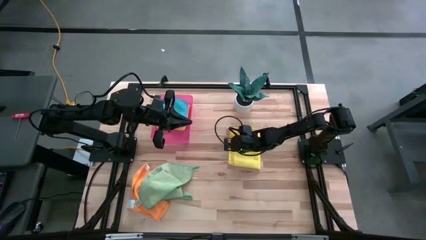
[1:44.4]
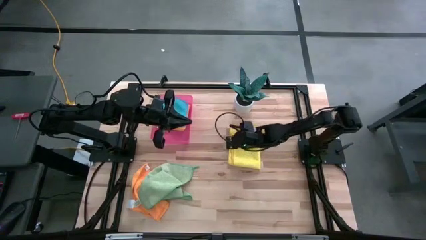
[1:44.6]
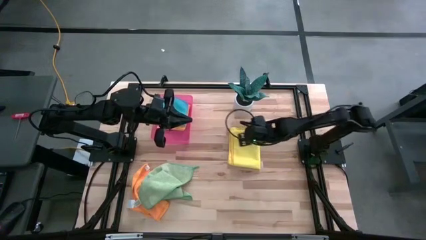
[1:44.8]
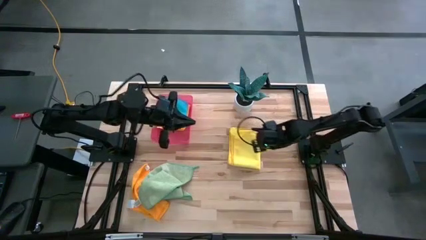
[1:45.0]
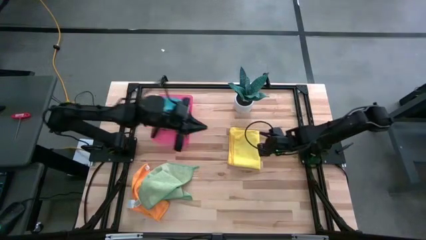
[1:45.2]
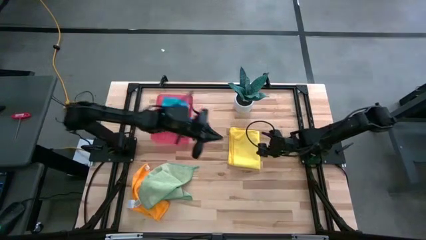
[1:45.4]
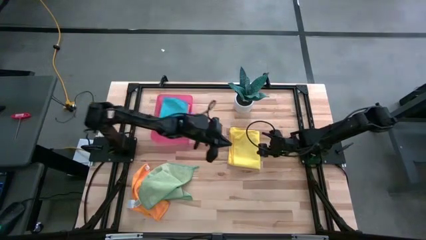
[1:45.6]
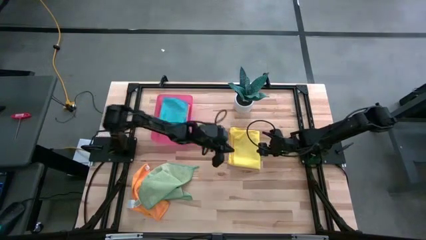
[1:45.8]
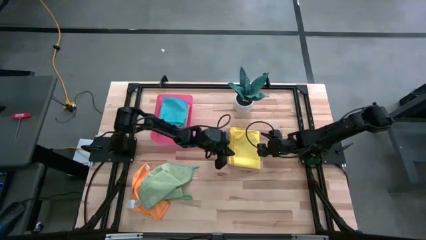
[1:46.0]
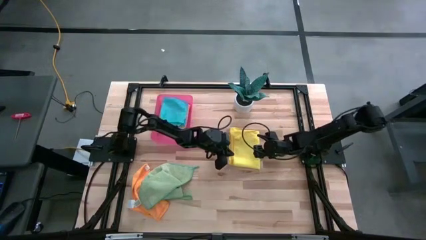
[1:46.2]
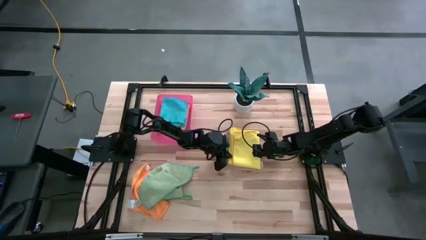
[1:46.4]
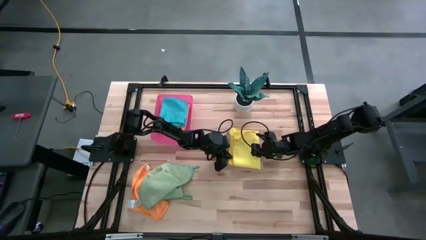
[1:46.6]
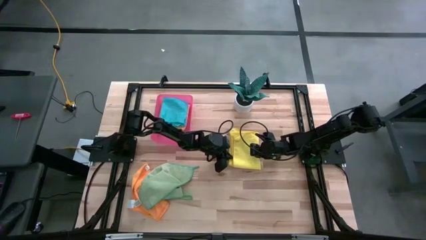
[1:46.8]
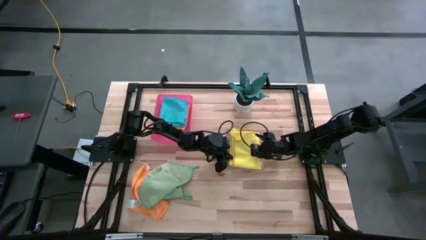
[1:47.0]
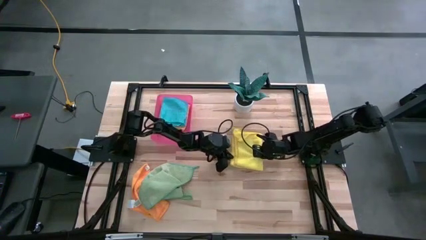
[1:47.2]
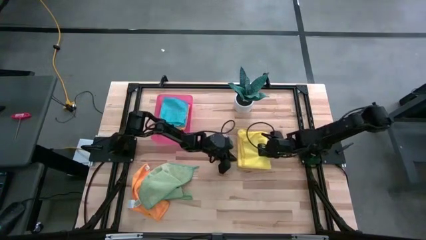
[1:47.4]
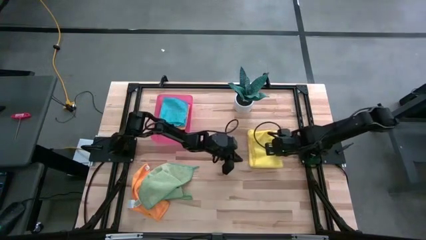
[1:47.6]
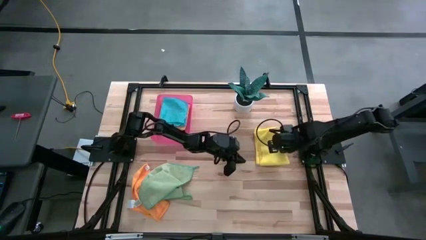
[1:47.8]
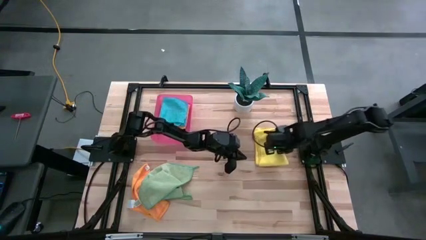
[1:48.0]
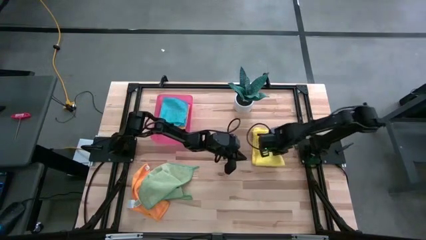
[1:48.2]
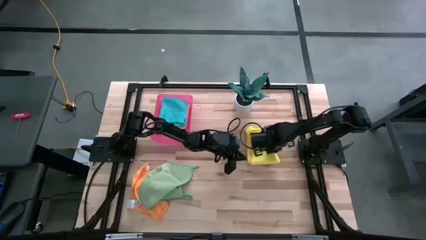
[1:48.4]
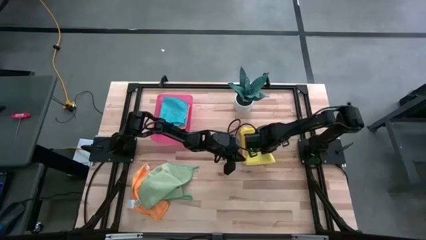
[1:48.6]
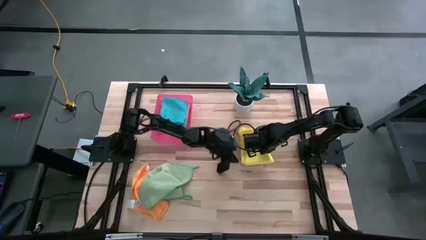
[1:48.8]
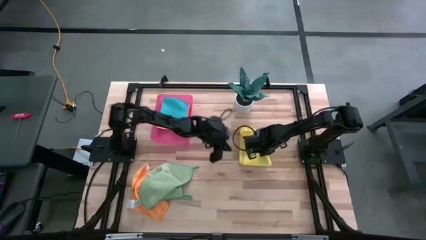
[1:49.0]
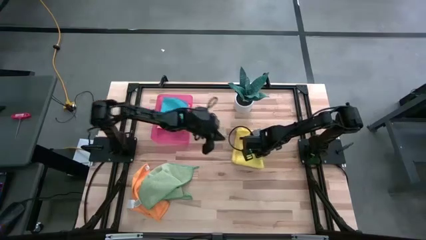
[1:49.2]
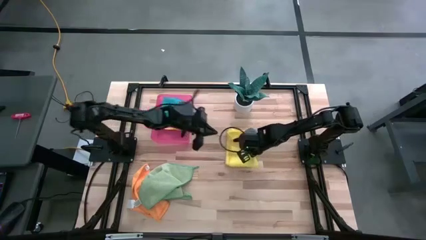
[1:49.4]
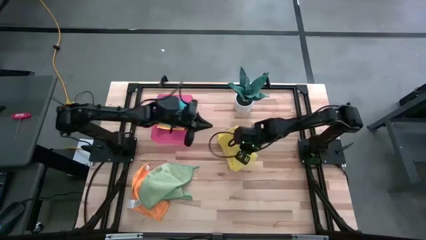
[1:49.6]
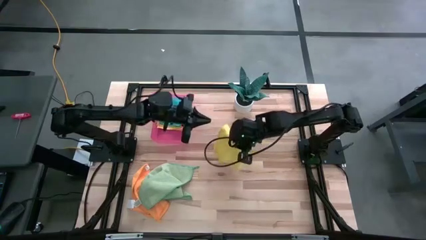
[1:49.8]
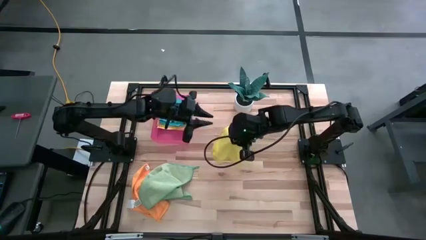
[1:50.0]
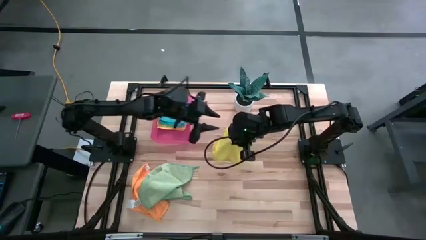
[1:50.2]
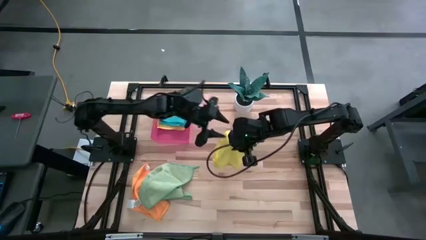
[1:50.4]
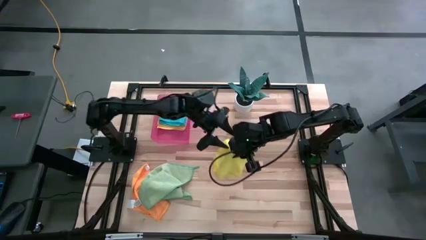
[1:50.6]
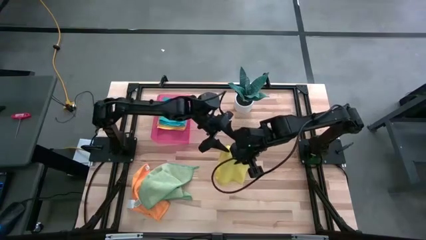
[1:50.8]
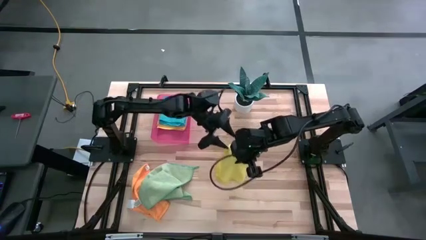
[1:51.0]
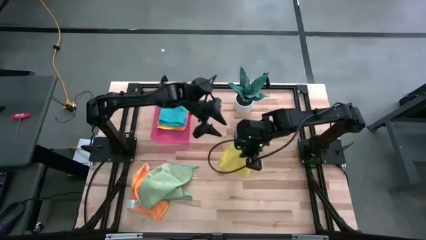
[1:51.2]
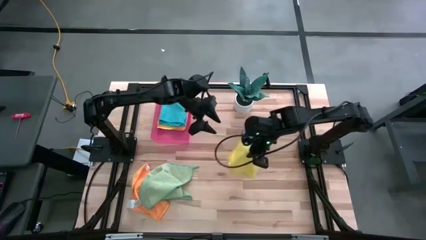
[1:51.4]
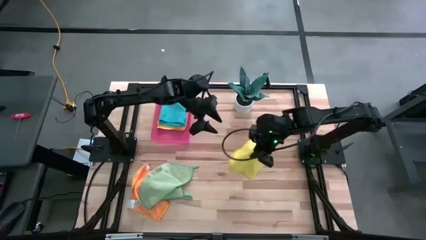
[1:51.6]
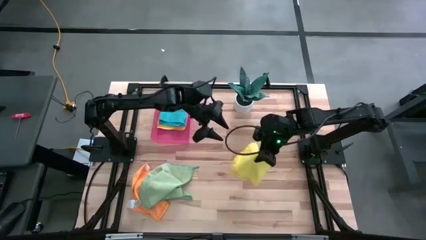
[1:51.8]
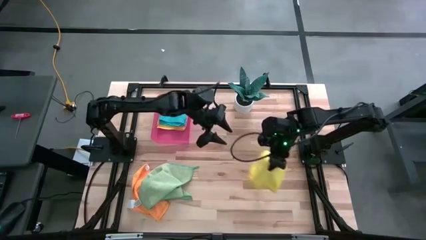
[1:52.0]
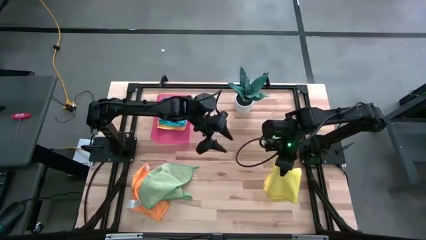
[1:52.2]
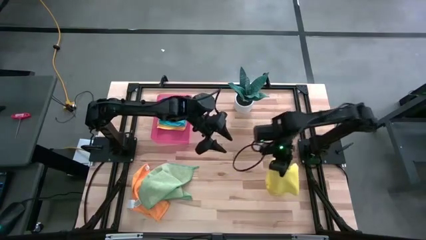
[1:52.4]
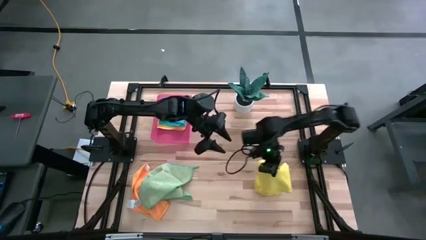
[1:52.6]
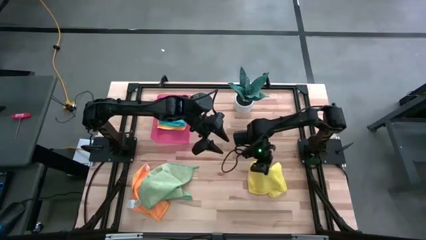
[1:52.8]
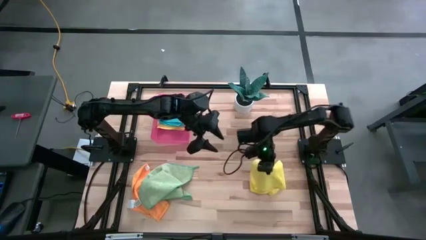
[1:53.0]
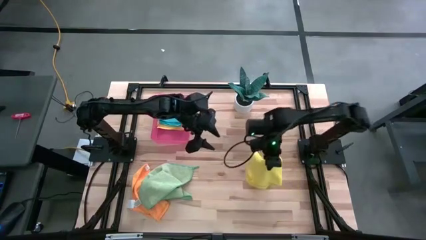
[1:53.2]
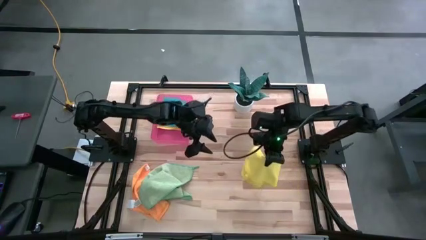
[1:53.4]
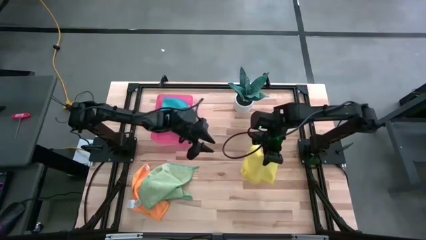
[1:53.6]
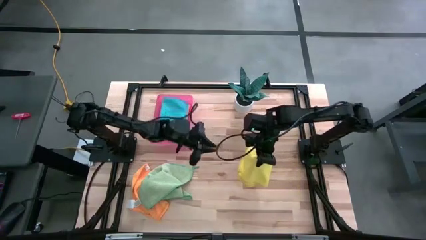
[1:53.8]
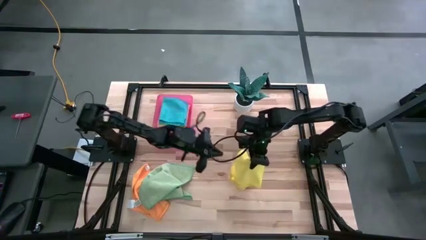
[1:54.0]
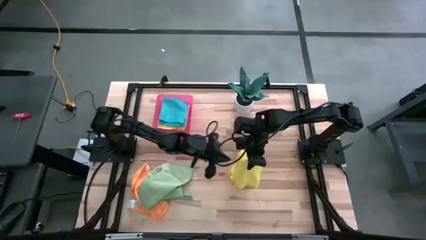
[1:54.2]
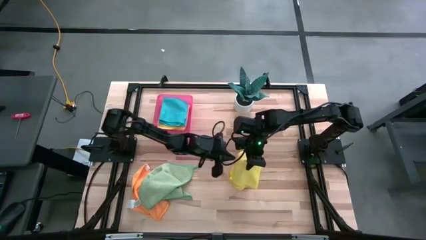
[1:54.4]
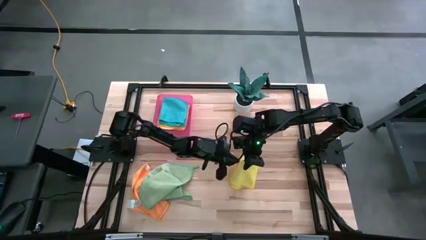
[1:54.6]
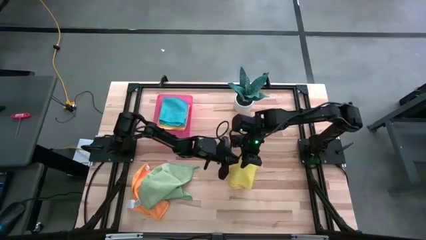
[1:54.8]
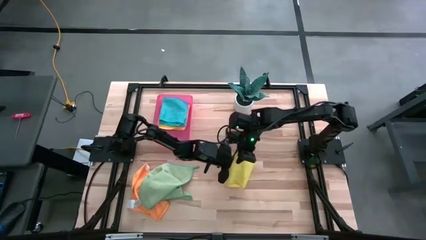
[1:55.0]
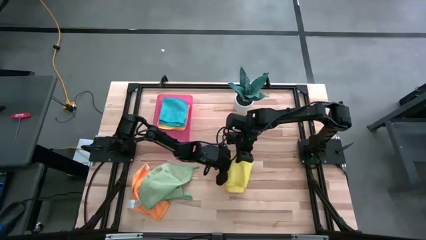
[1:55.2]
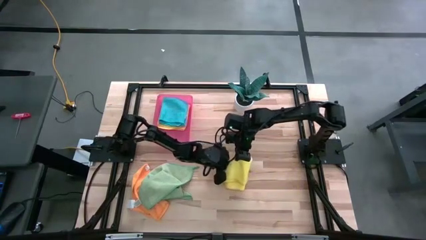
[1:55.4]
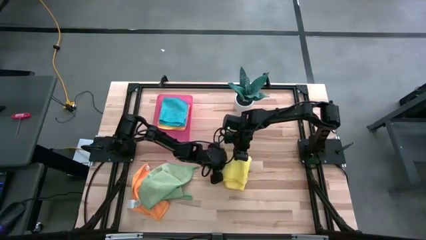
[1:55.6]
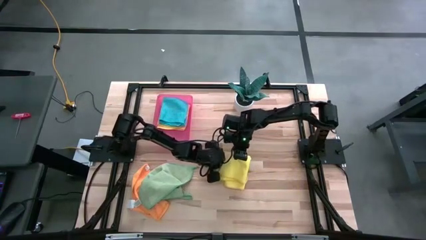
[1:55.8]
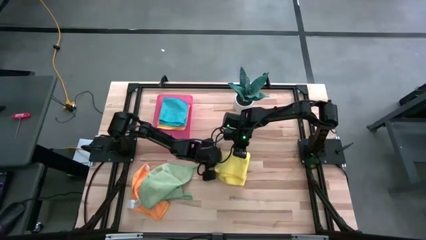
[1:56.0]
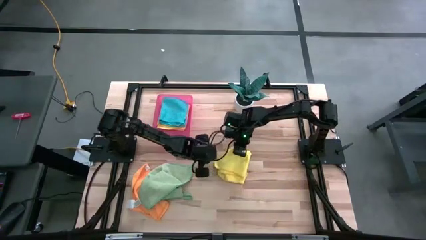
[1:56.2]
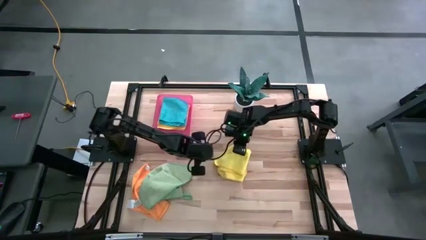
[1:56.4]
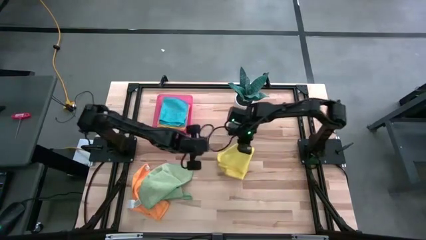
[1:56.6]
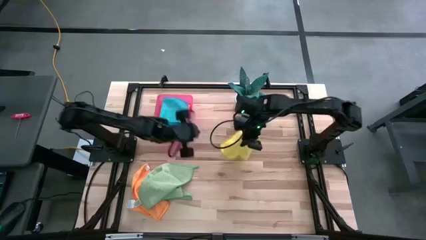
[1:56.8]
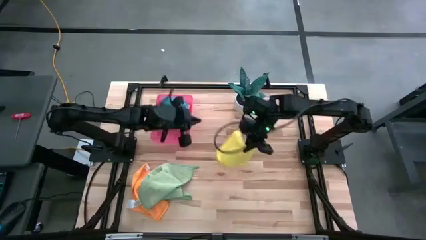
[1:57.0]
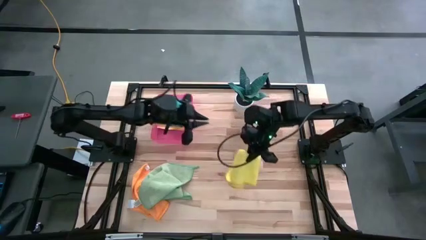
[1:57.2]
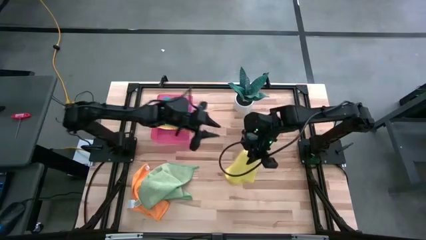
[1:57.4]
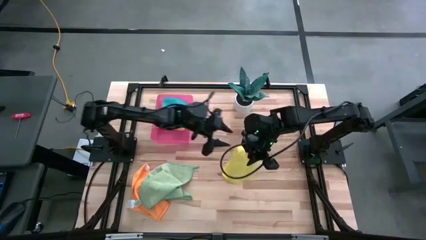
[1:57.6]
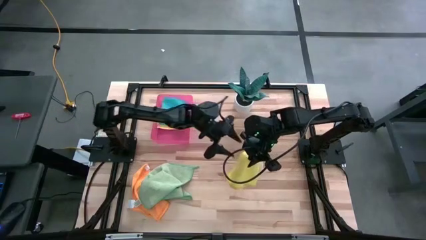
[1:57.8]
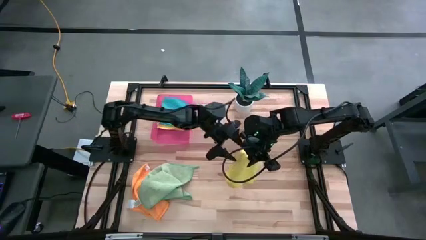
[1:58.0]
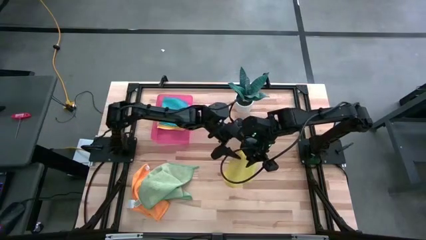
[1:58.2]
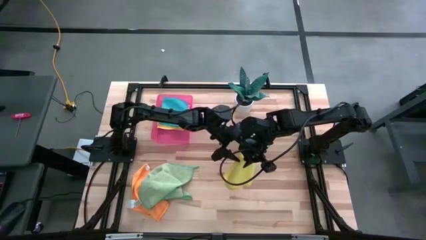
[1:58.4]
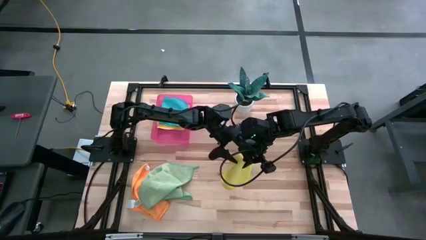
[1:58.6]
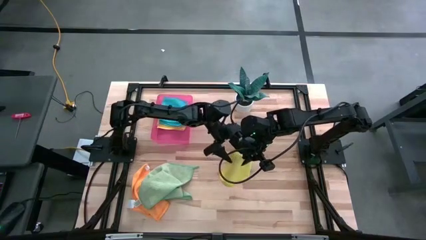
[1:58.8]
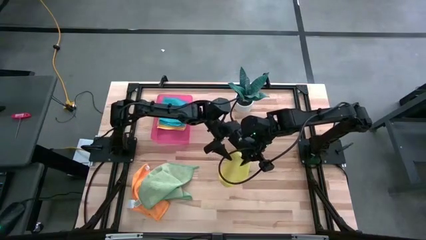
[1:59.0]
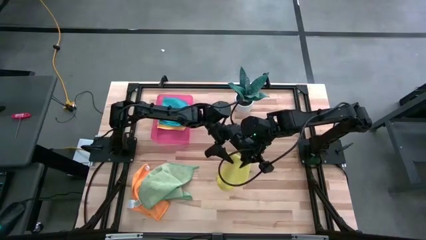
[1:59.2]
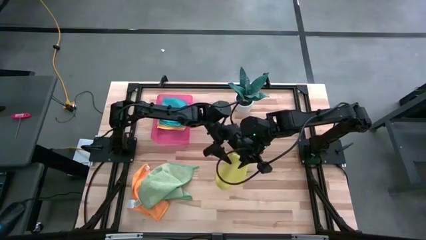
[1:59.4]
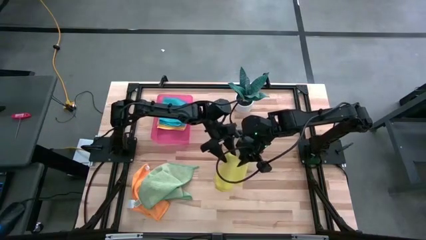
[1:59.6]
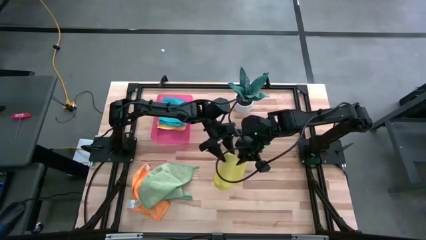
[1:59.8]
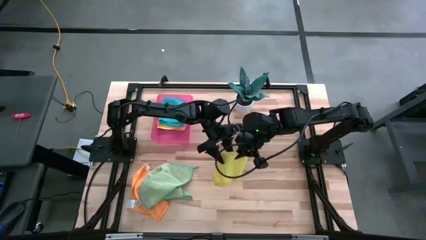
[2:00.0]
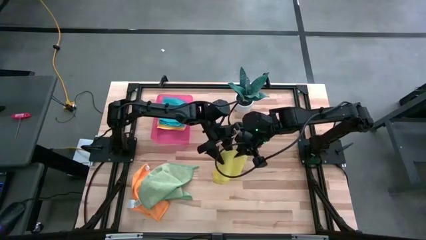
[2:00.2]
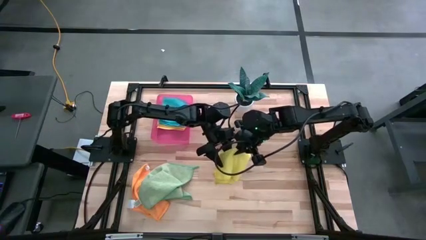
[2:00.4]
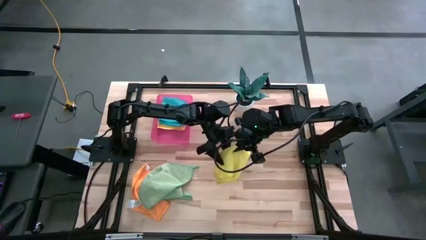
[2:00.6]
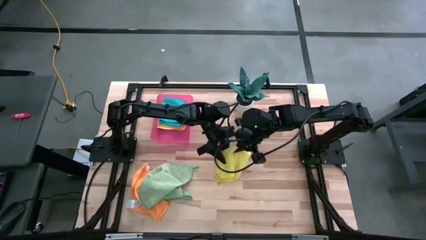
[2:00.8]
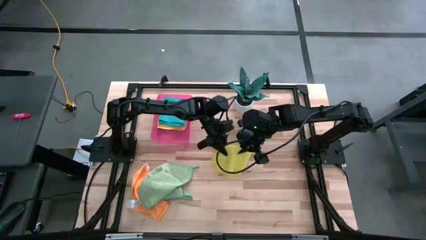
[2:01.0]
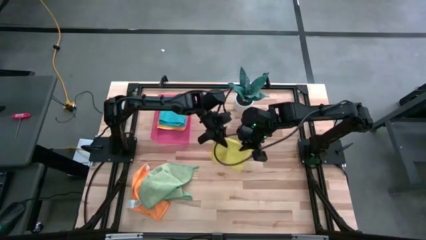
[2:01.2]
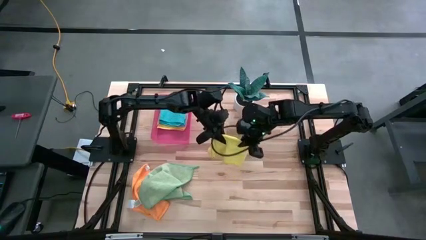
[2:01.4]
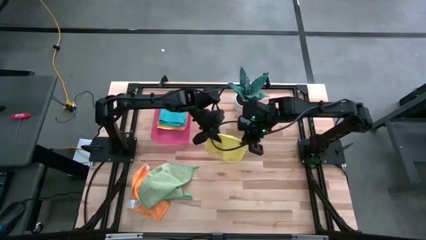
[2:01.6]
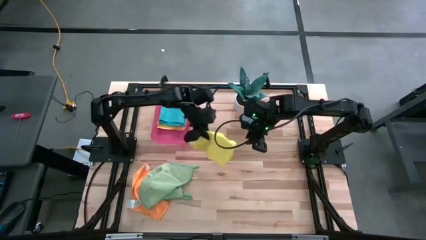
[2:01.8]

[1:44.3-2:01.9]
Task: Fold microfiber towels
Put the folded yellow microfiber towel into the pink bin
